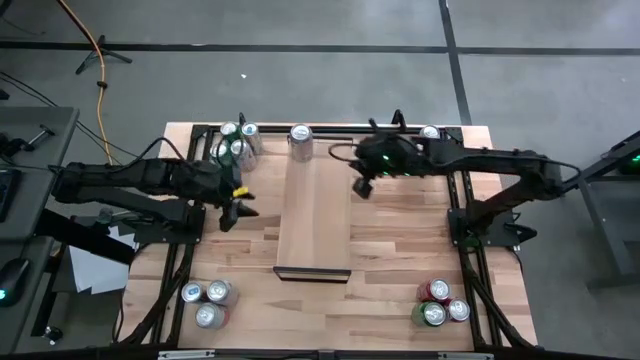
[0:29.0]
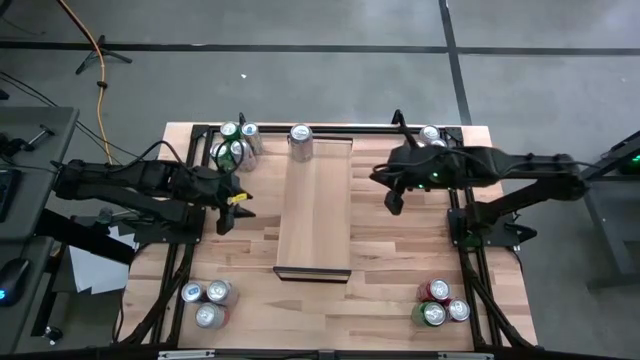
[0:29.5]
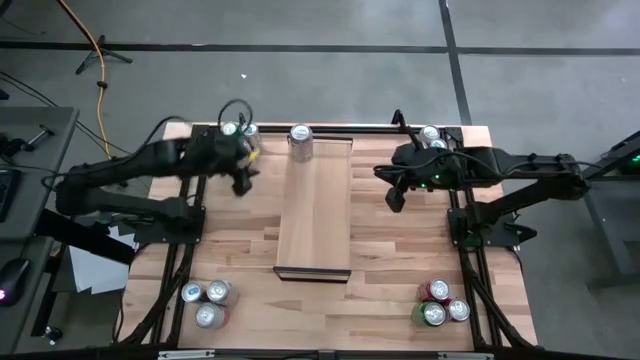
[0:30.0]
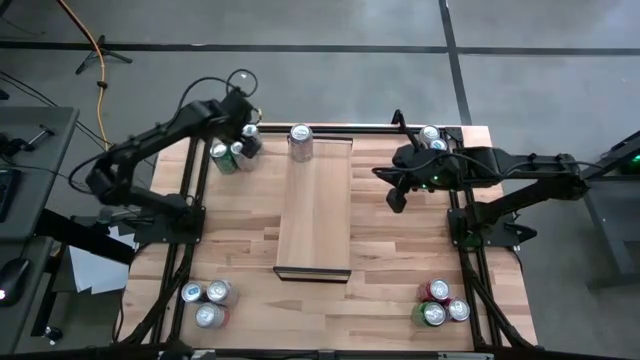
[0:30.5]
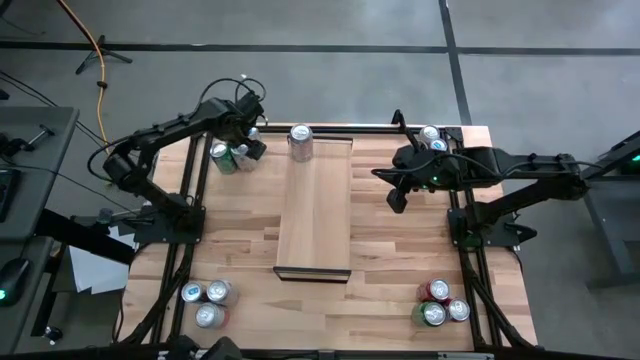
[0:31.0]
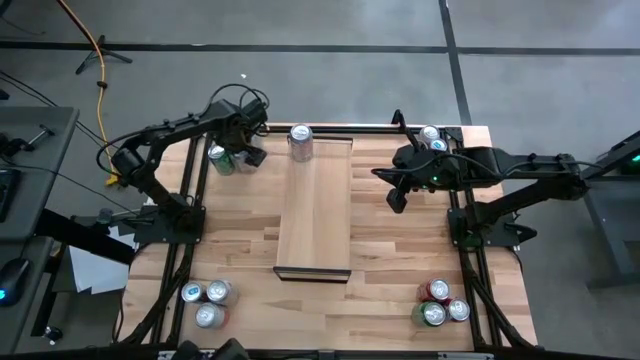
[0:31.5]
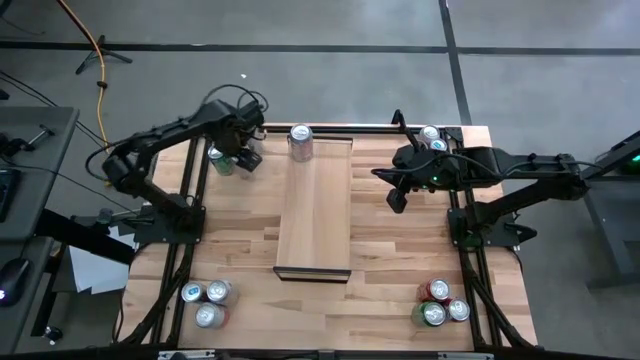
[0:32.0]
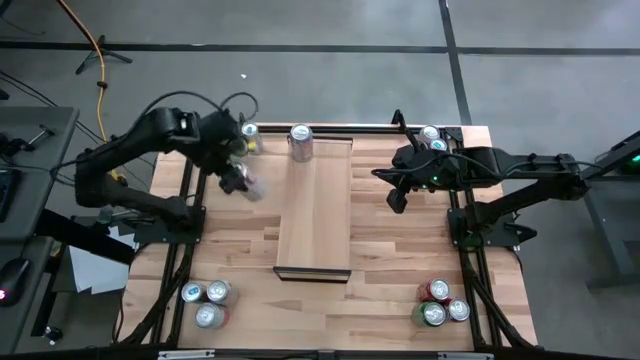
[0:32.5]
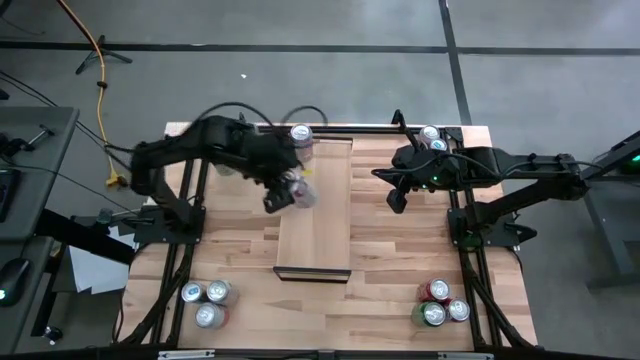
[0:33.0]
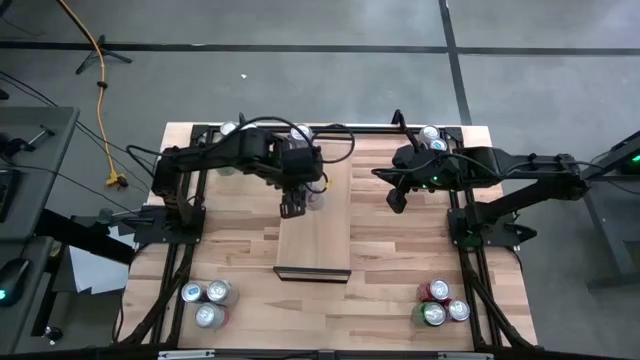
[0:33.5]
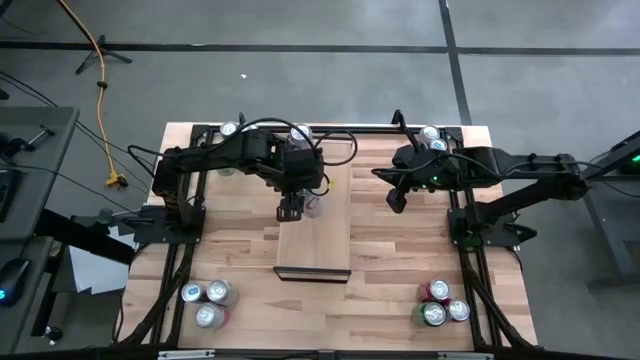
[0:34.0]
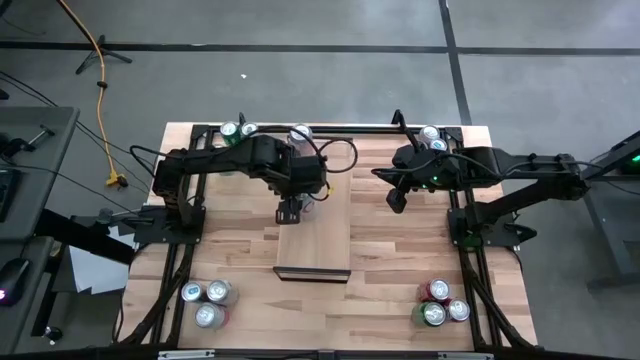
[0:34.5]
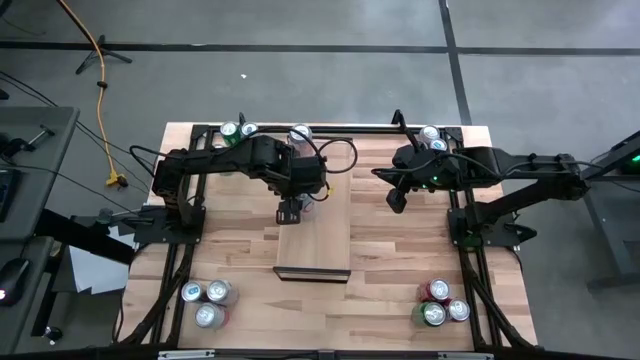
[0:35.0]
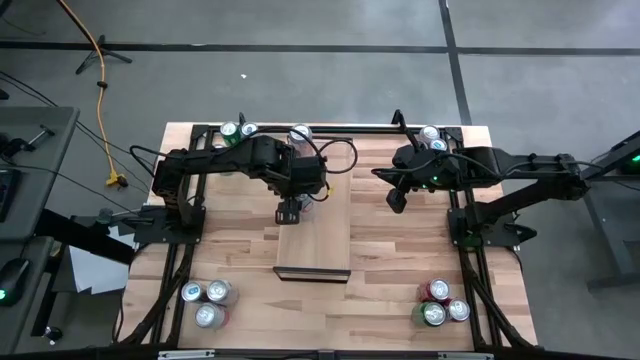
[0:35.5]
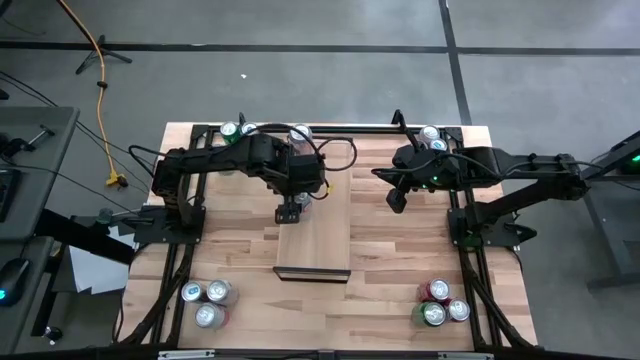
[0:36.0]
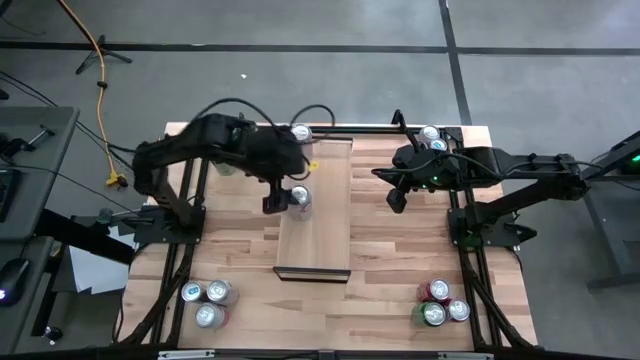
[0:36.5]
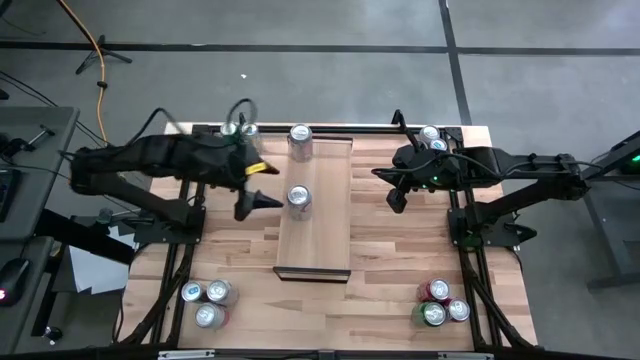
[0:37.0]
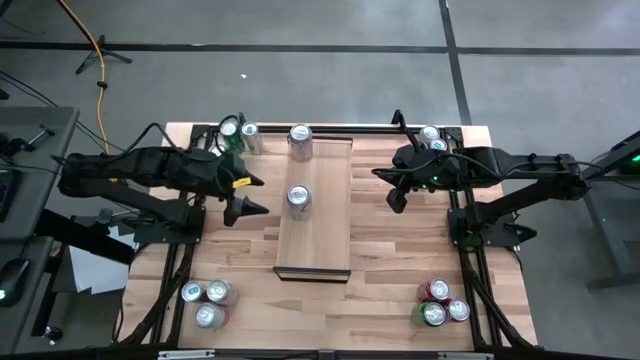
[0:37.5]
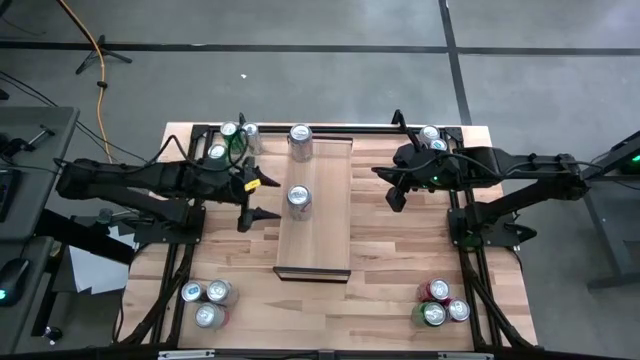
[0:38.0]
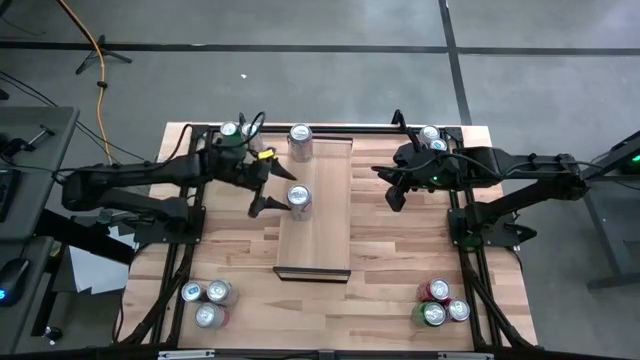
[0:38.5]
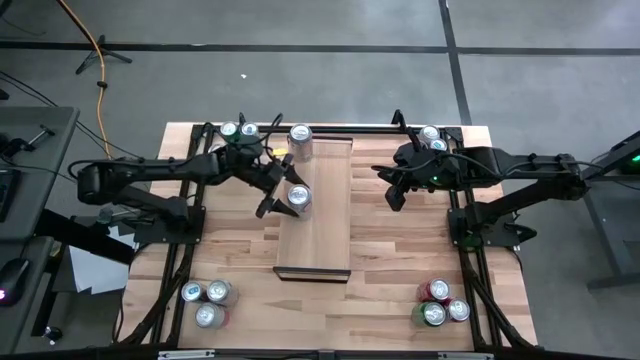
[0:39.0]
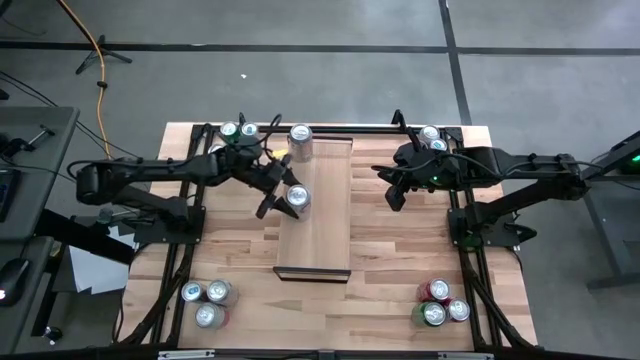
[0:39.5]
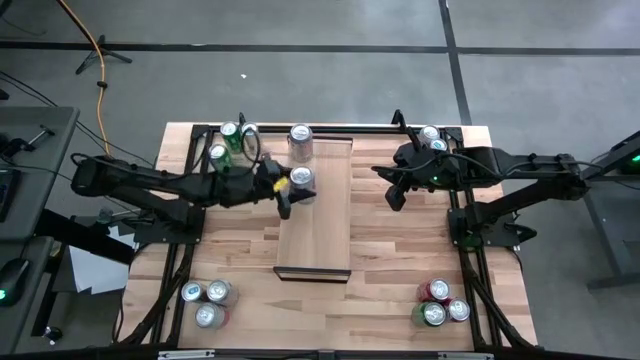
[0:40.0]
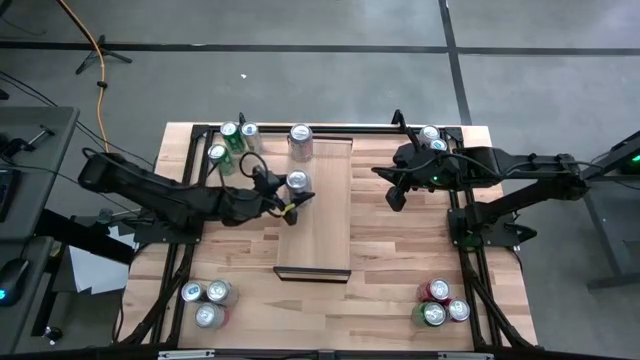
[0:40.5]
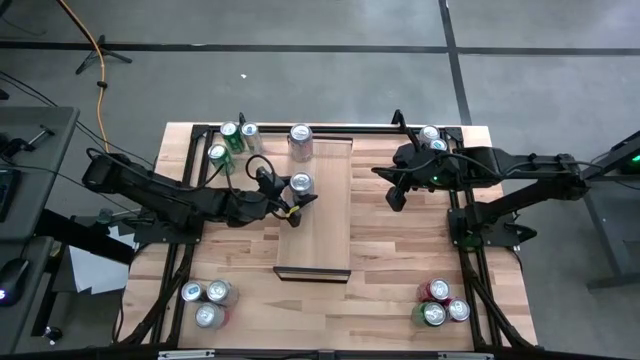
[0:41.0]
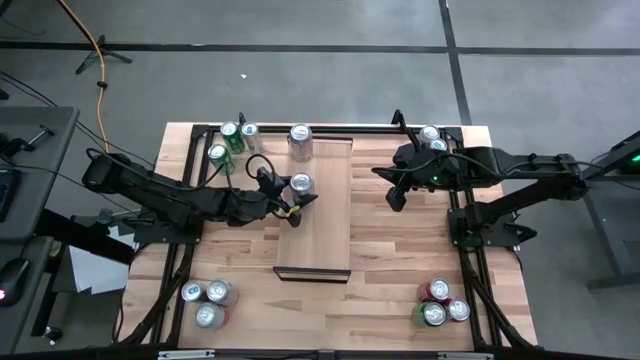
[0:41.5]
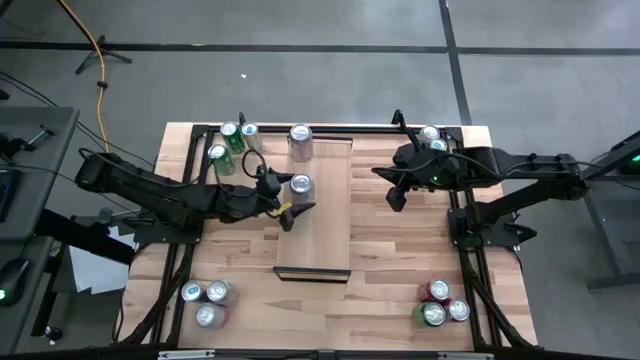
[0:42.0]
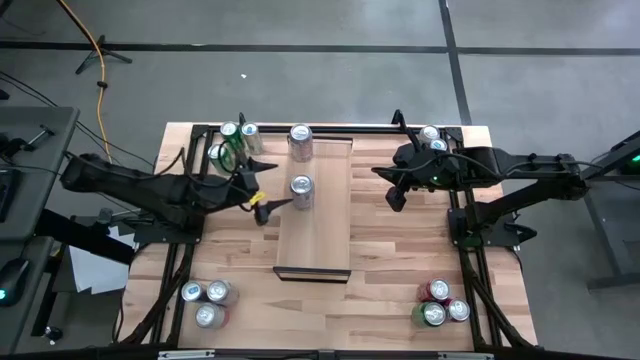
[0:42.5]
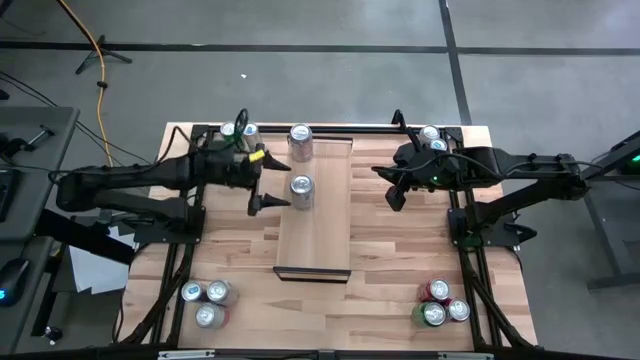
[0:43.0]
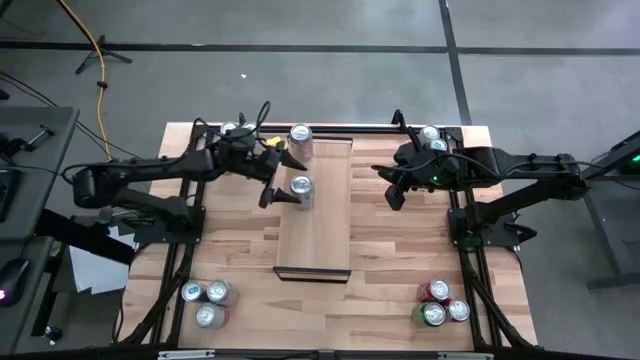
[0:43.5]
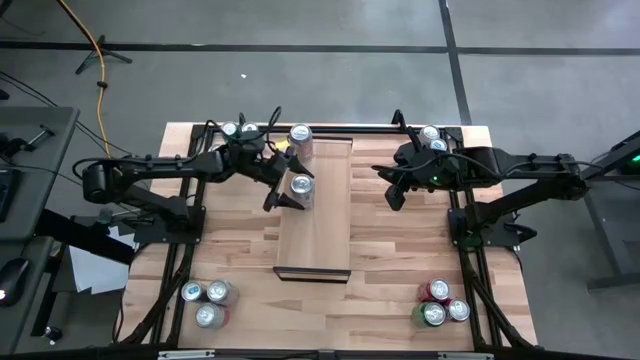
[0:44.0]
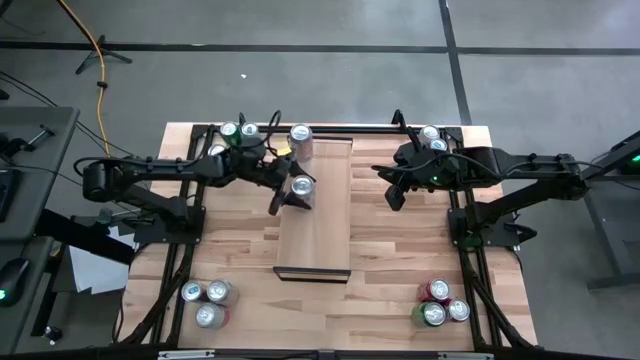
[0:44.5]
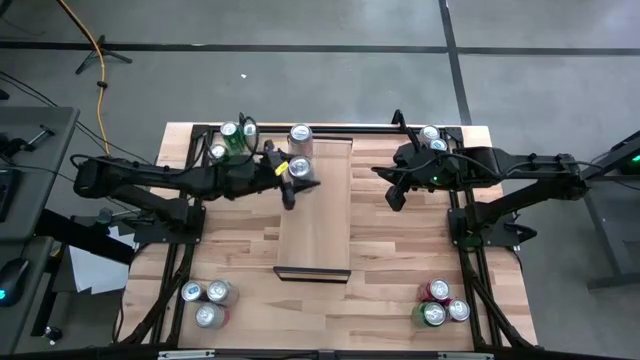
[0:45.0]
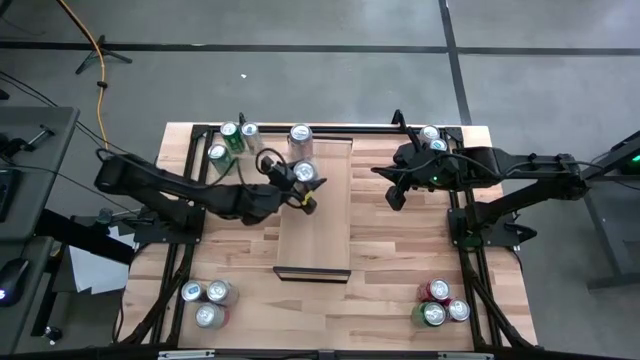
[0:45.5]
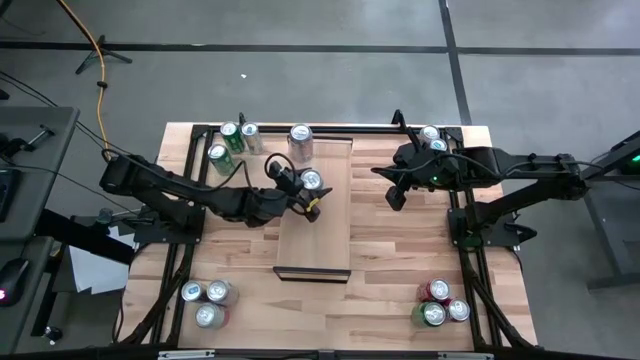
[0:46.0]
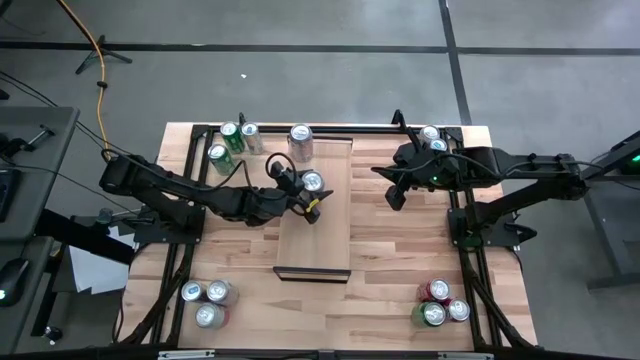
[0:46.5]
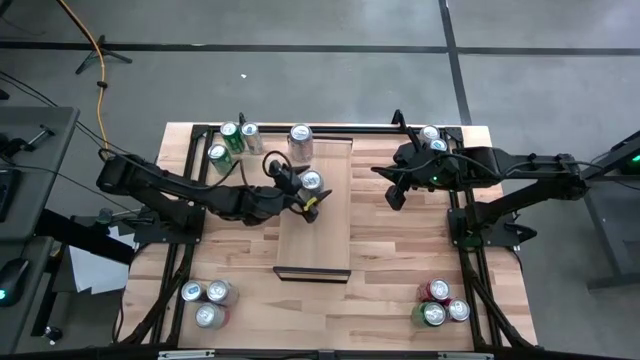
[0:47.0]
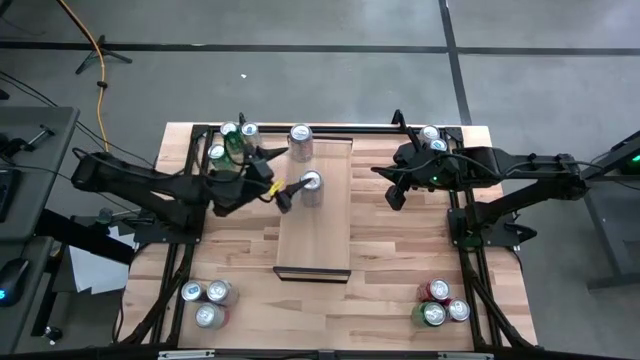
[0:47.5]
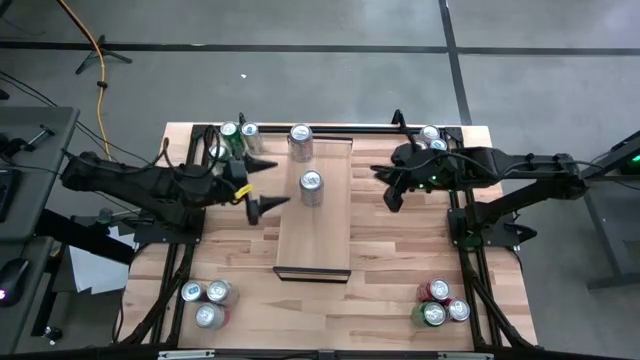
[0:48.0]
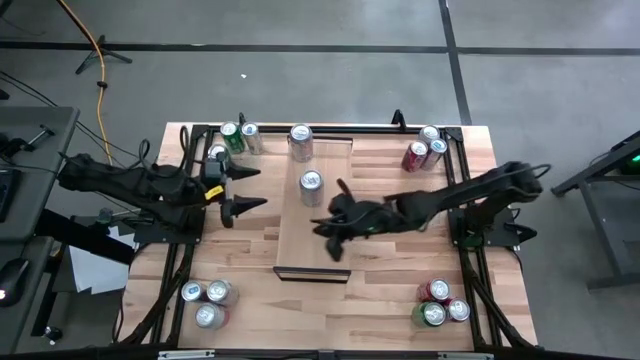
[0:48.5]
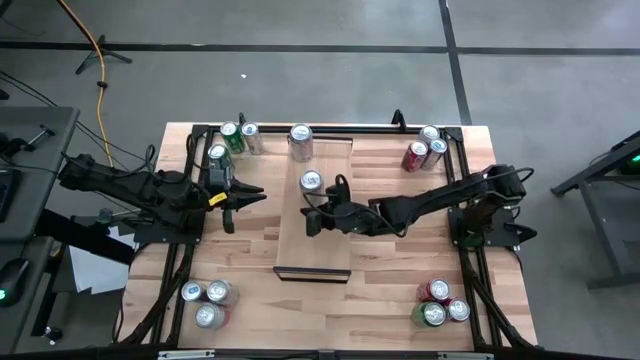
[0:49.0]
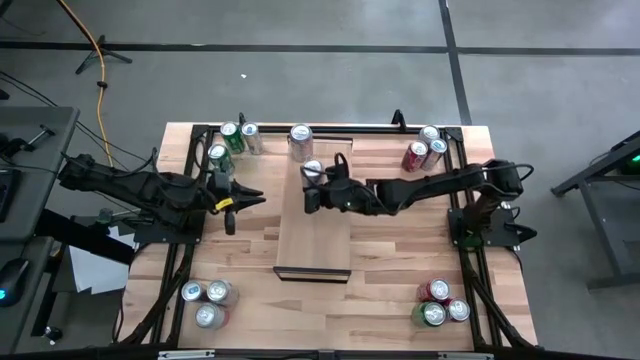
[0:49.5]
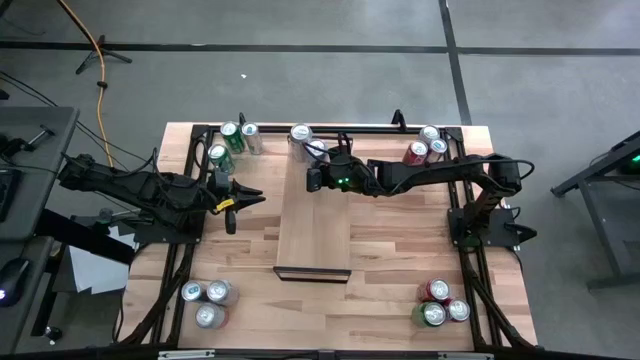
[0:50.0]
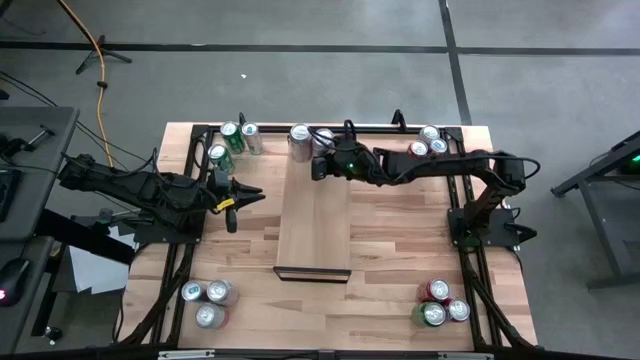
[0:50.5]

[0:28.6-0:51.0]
Task: Place canned beverage on shelf
Put the silver soda can on the shelf
